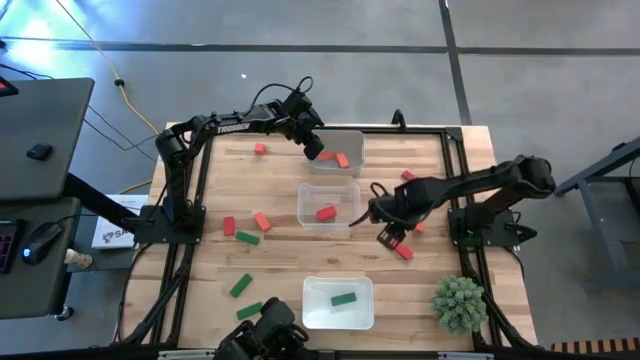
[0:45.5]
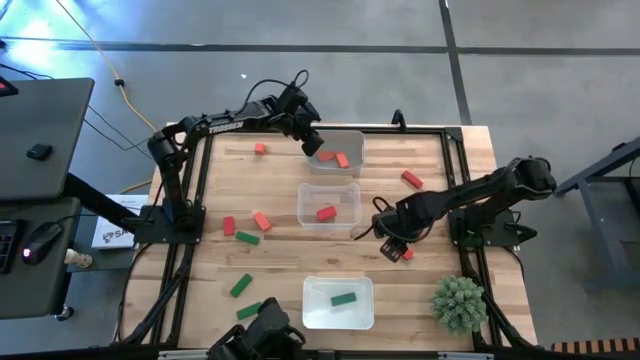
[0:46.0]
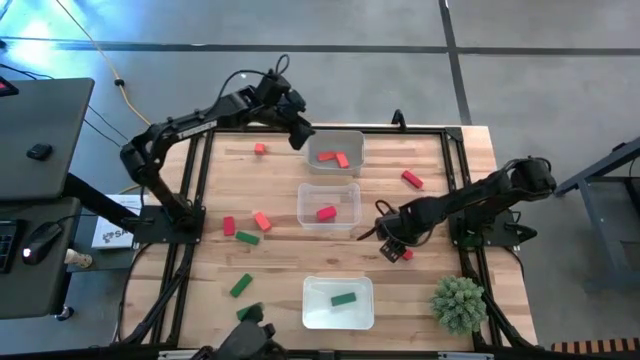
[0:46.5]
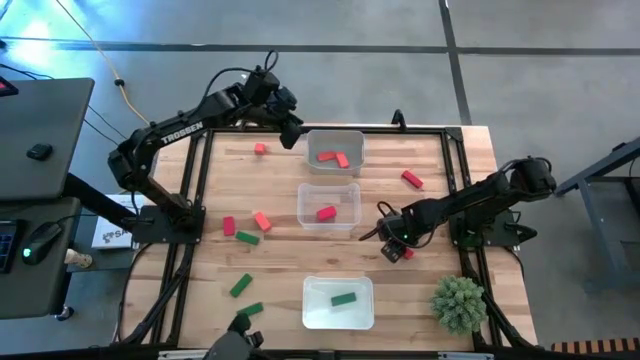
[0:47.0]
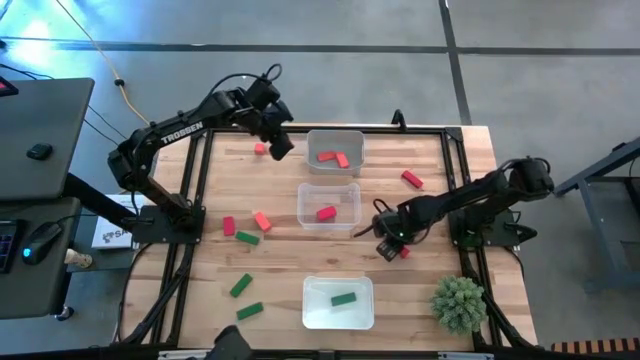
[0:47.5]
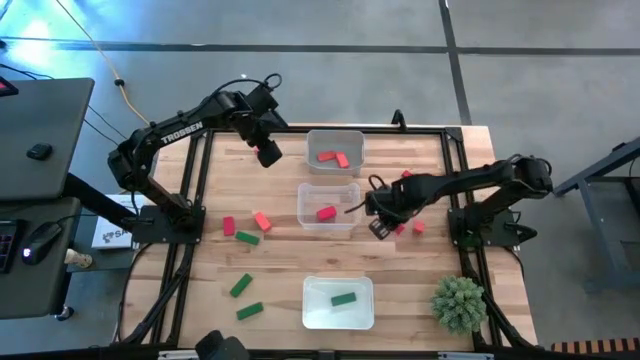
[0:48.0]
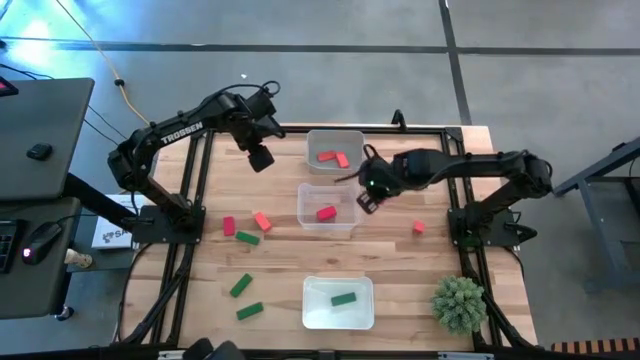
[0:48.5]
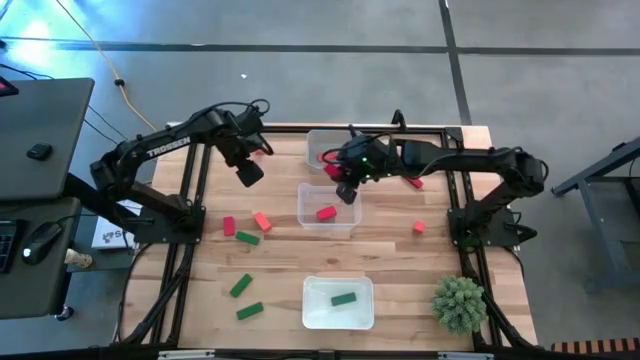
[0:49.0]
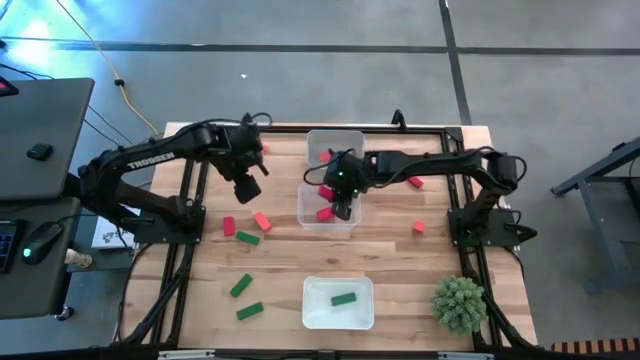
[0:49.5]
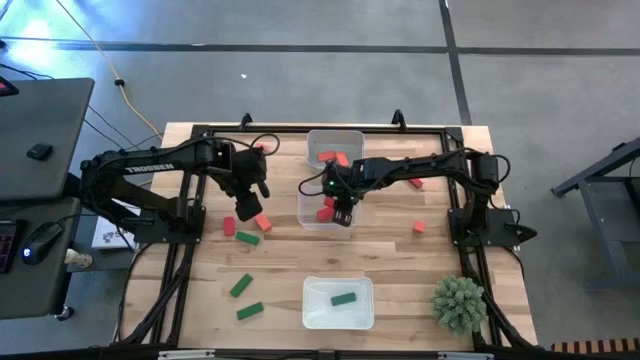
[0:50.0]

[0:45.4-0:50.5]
Task: Sort & place blocks by color
Put the red block into the transparent bin

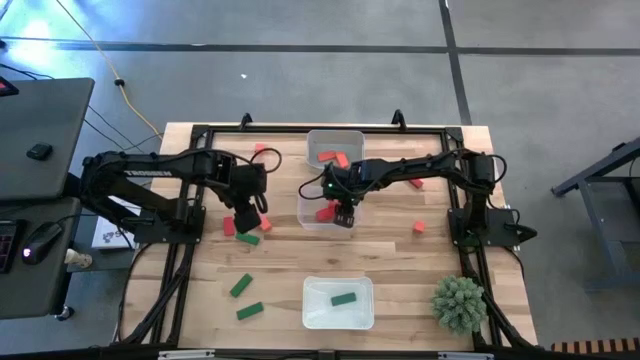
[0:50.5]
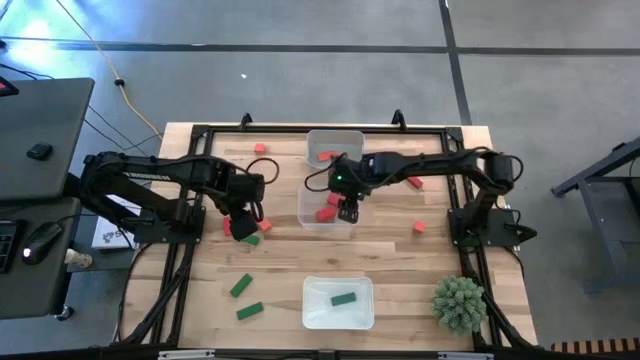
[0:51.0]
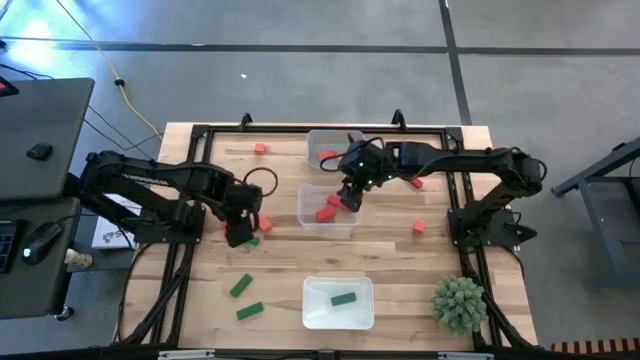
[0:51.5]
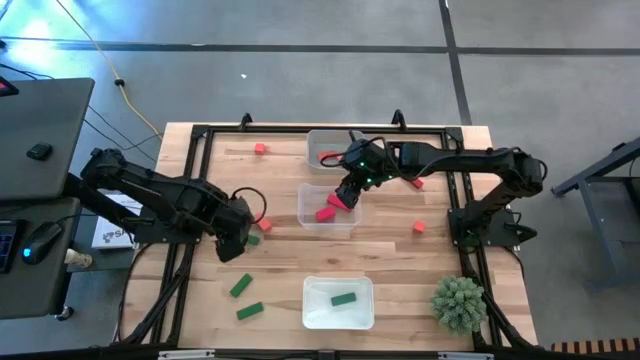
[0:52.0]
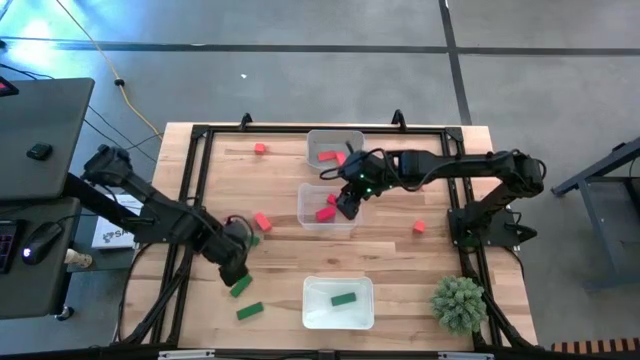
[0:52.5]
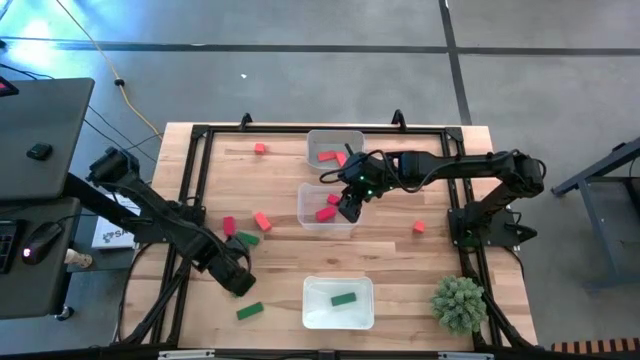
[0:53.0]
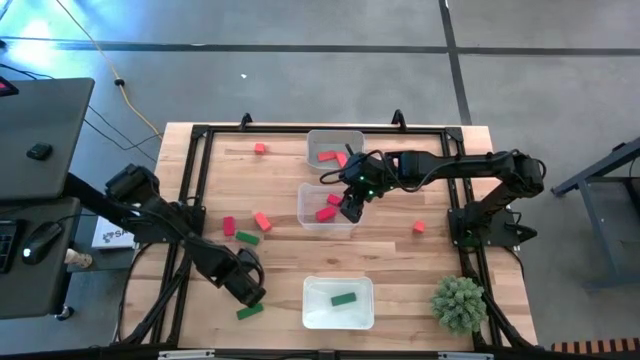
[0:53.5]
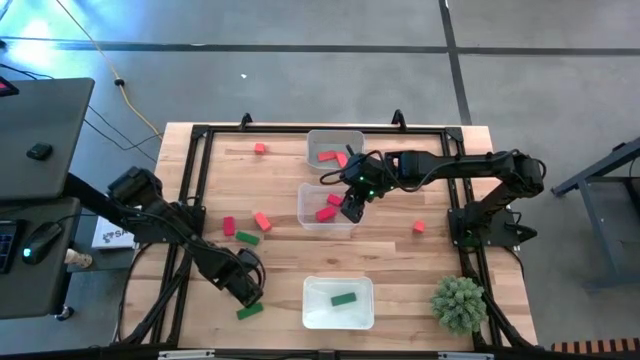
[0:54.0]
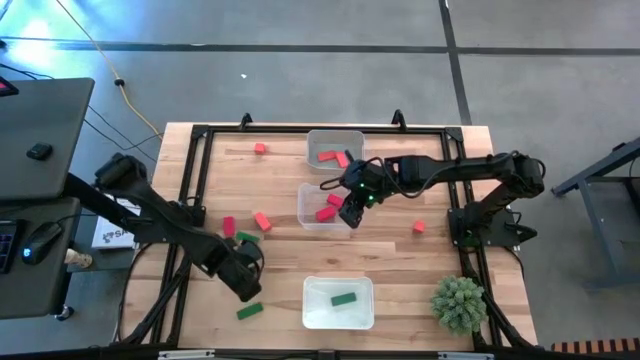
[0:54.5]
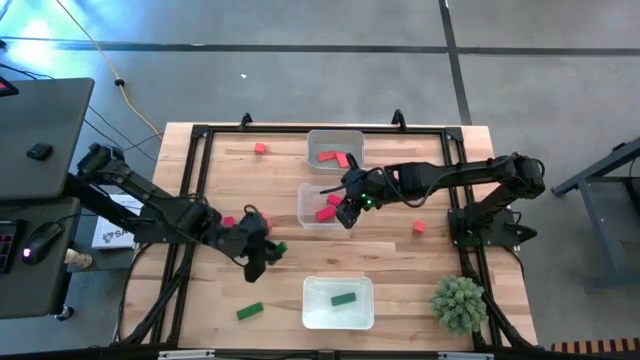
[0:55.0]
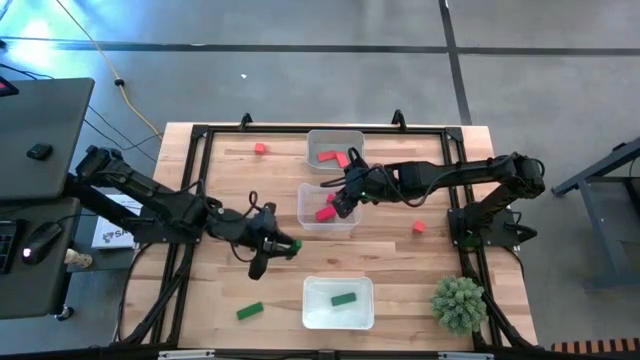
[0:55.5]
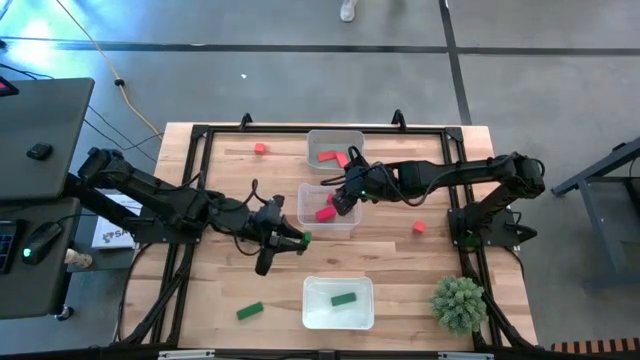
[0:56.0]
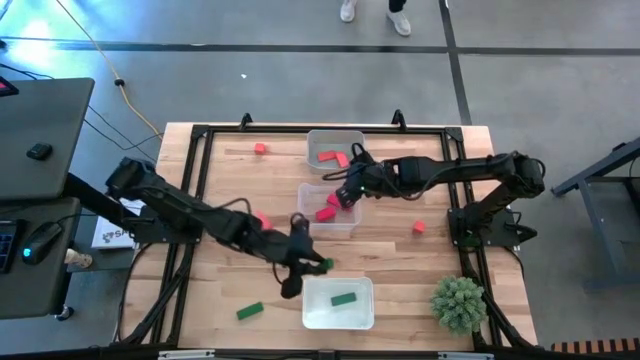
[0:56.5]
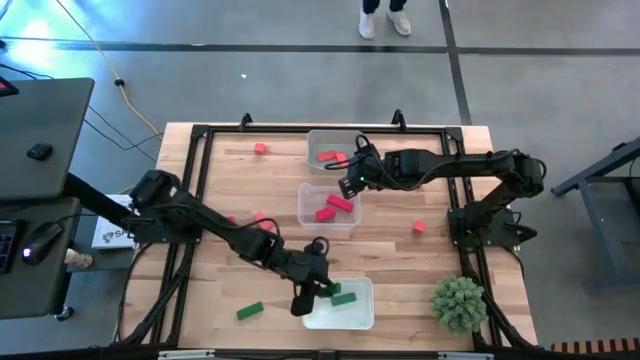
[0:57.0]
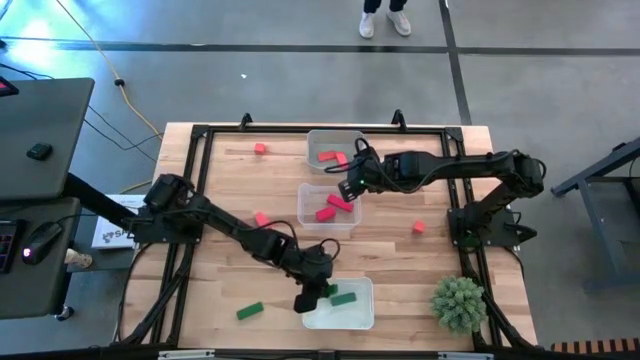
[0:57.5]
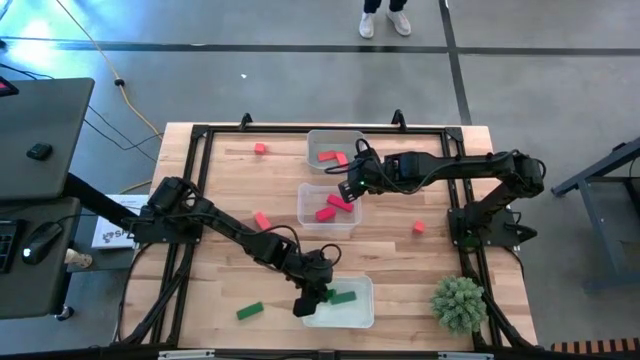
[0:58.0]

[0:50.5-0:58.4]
Put the green block into the white bin

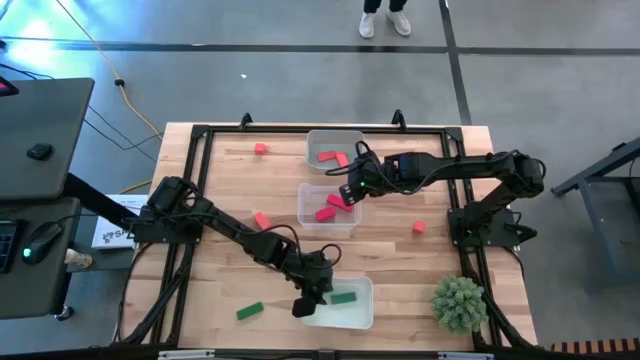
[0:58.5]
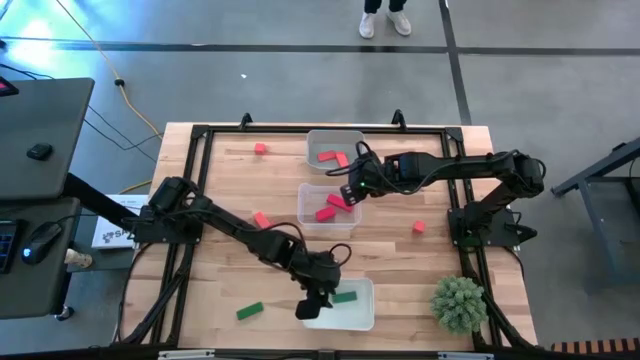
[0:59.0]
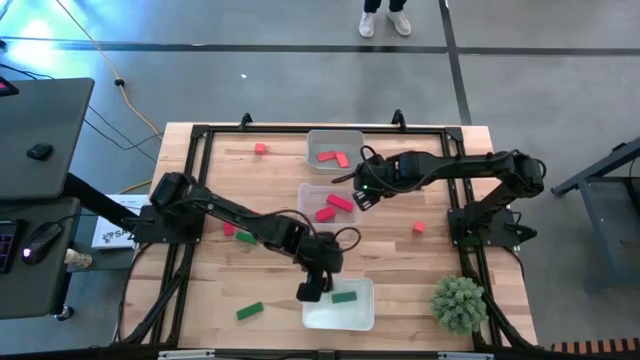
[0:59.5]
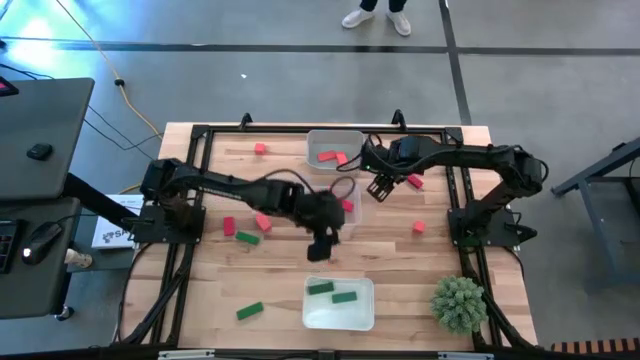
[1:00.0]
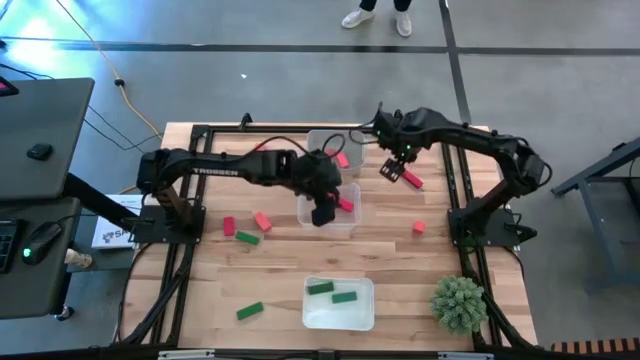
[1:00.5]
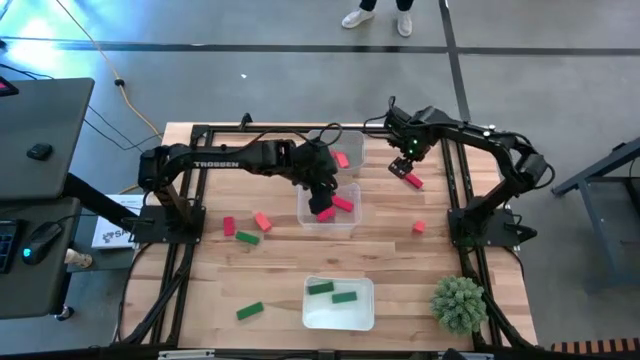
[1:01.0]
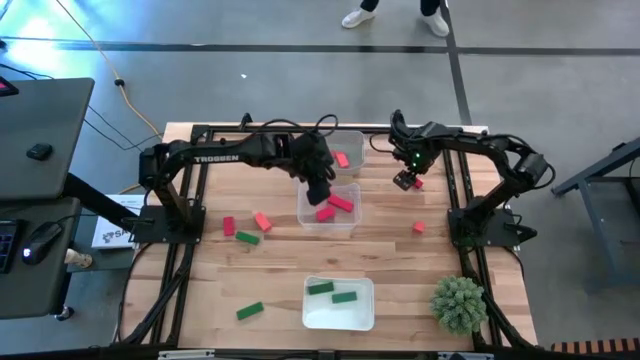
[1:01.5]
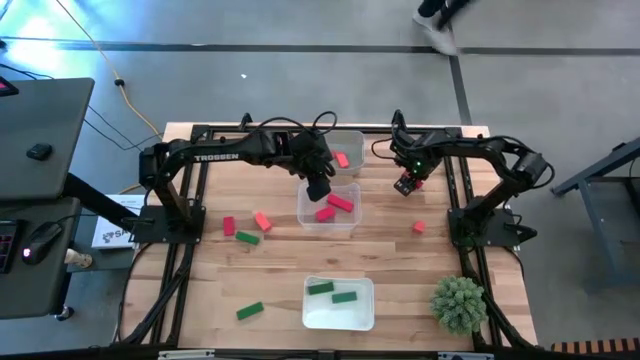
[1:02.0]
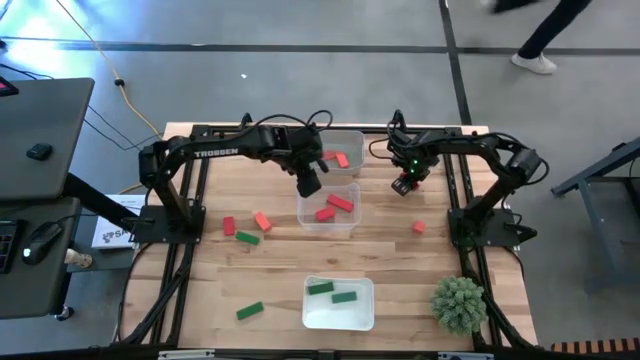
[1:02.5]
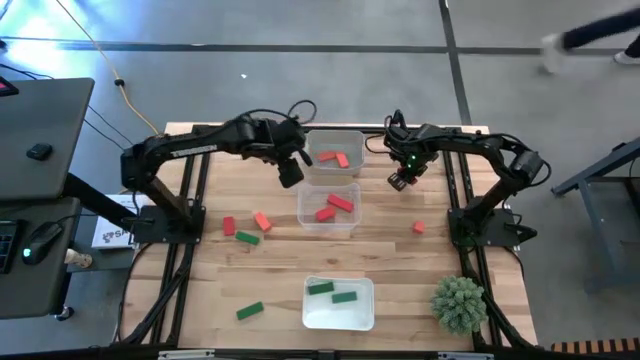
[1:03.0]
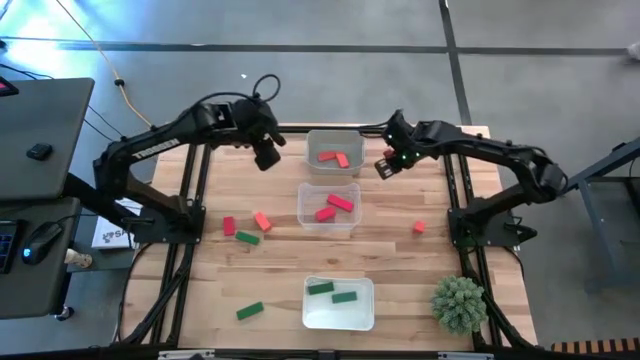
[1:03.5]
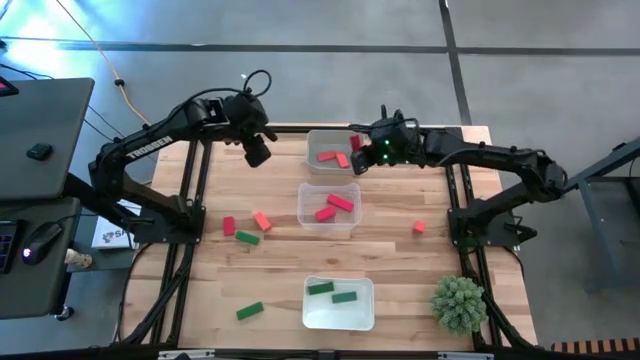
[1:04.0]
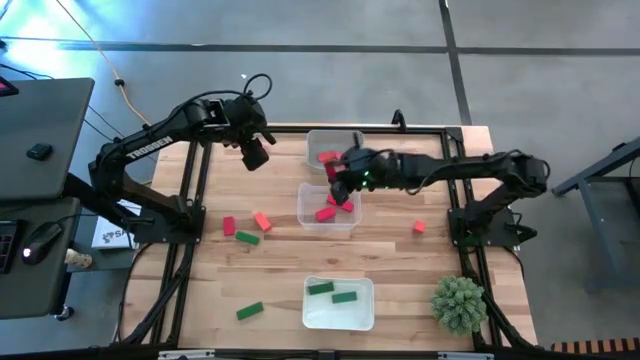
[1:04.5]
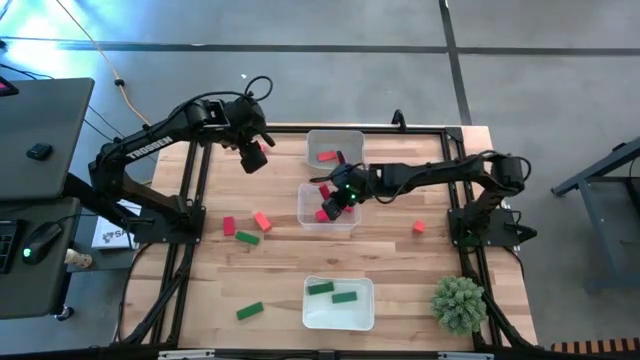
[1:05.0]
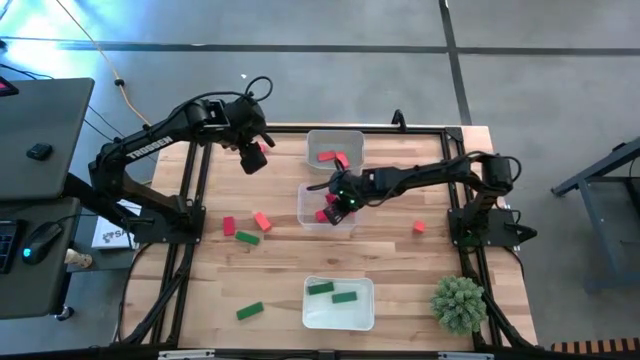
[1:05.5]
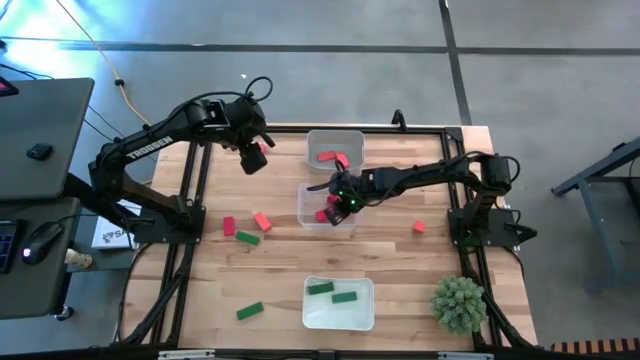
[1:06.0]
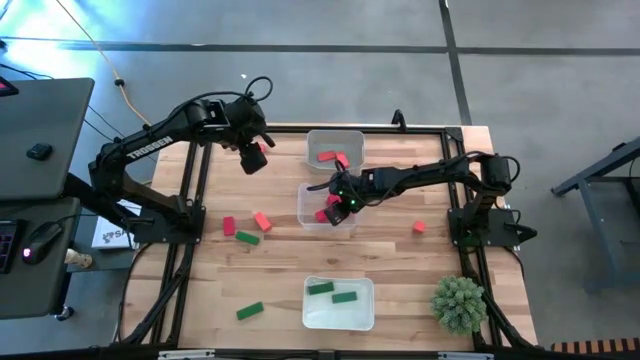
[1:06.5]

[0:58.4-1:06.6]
Put the red block into the transparent bin
